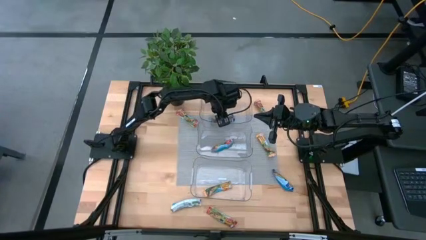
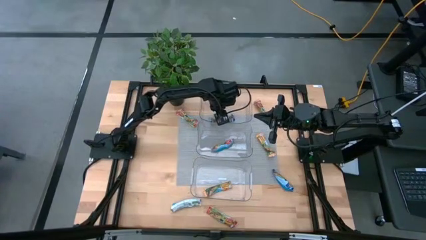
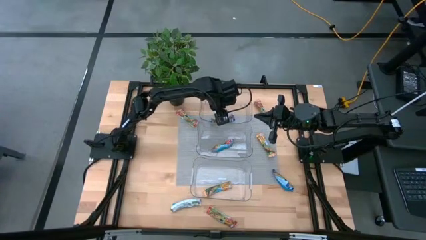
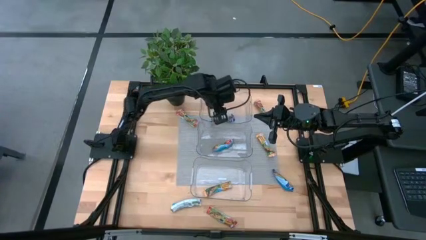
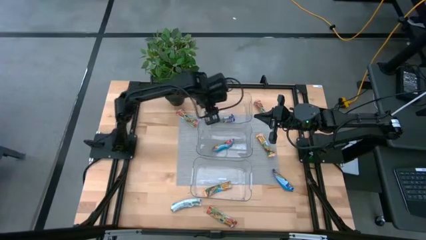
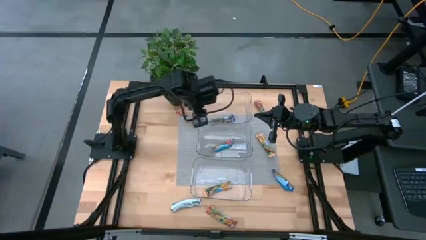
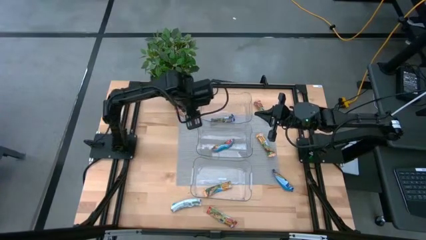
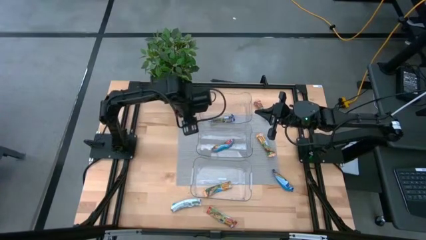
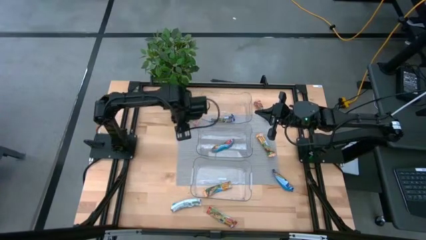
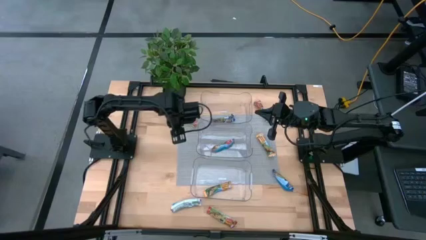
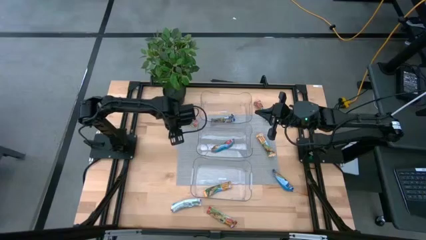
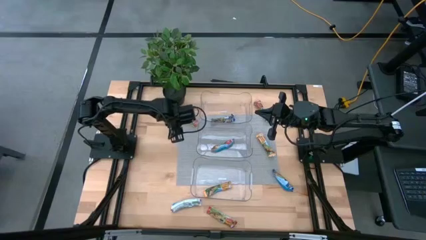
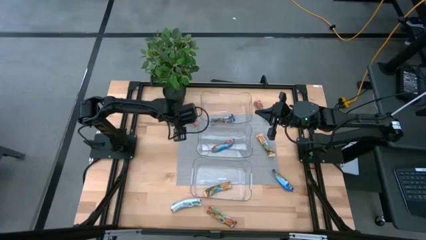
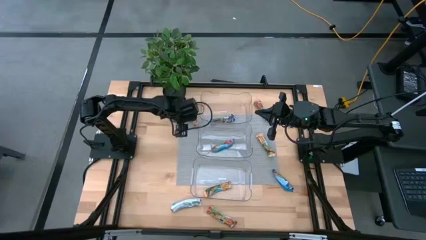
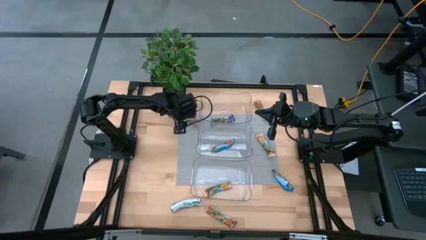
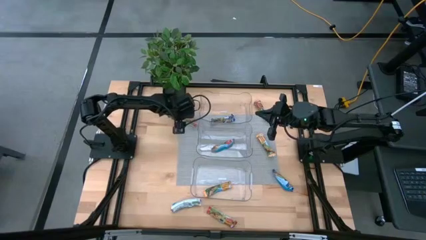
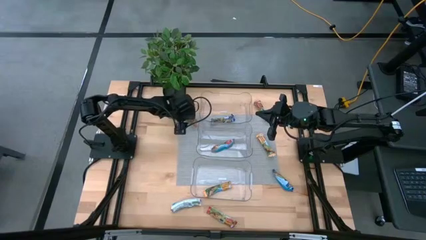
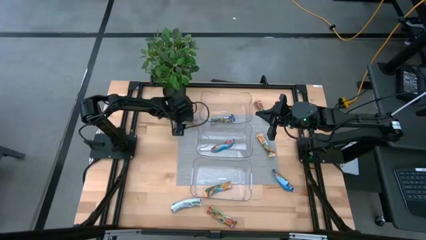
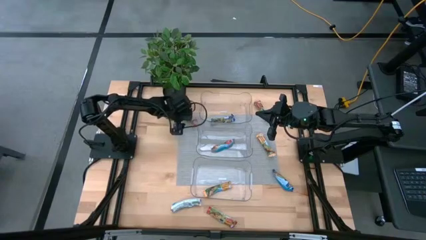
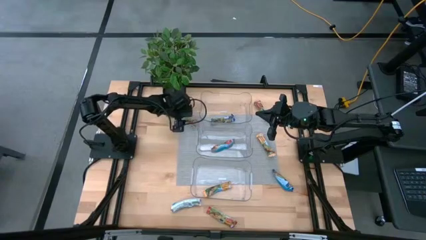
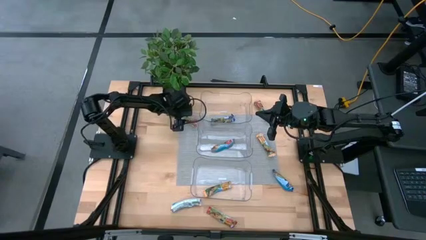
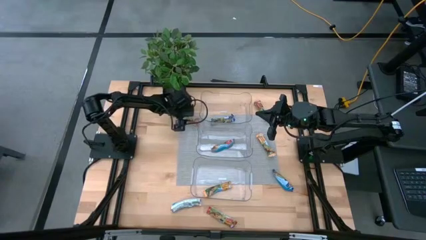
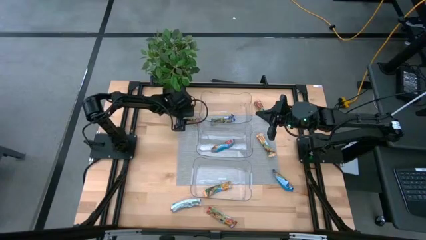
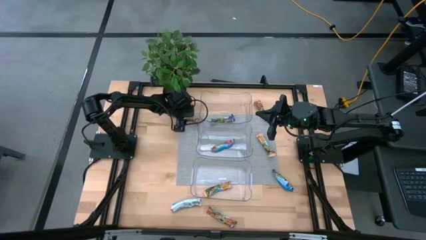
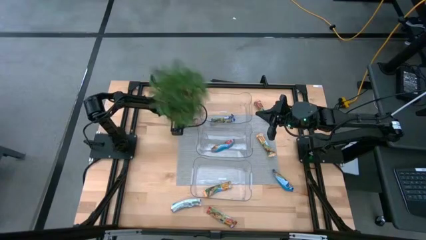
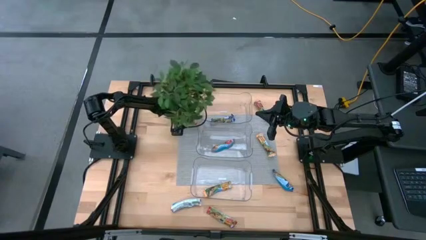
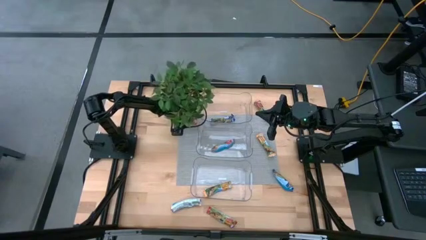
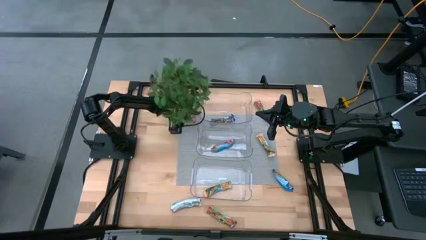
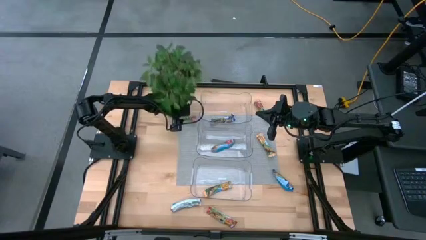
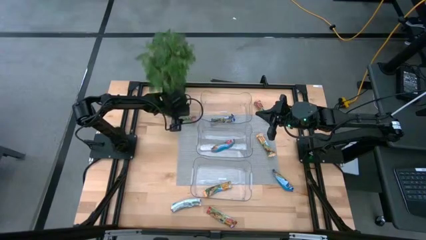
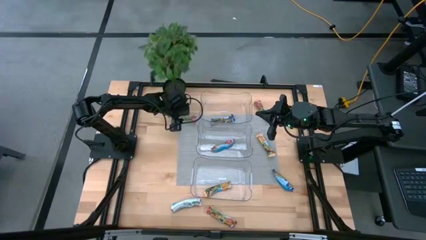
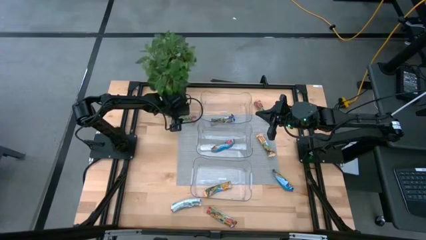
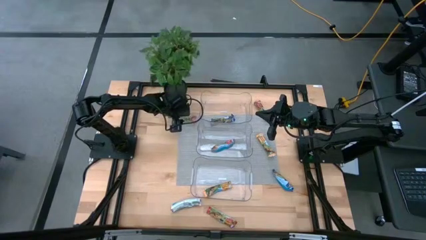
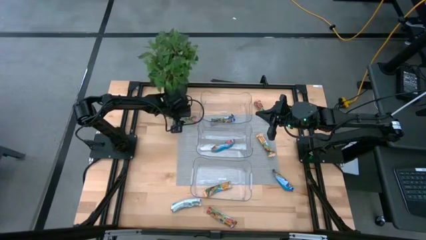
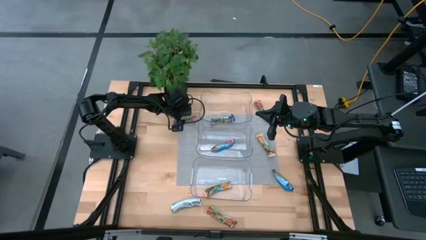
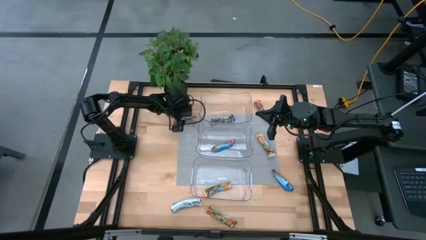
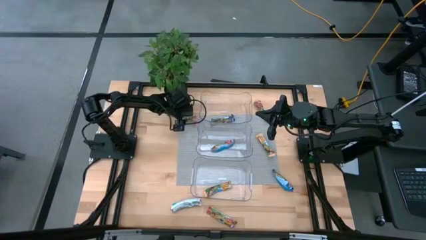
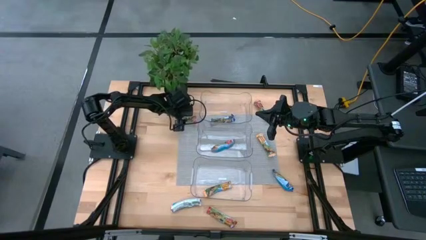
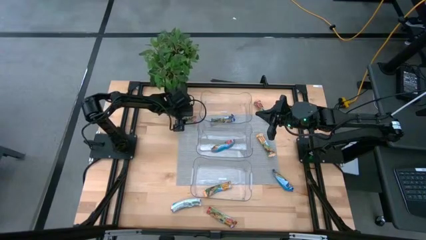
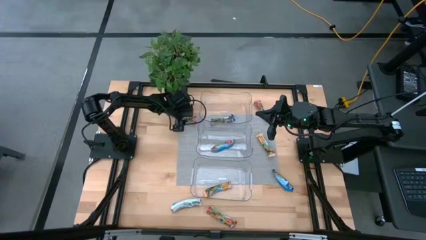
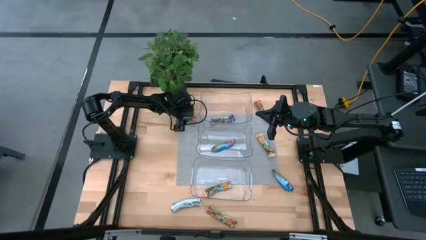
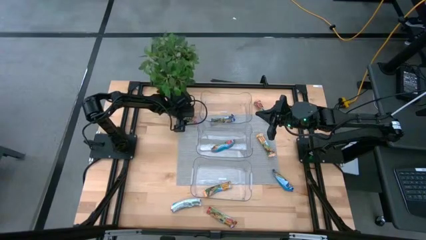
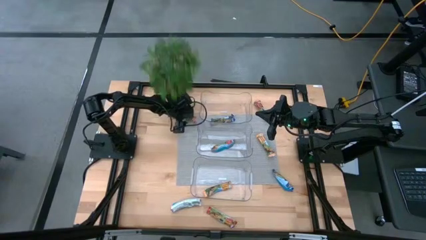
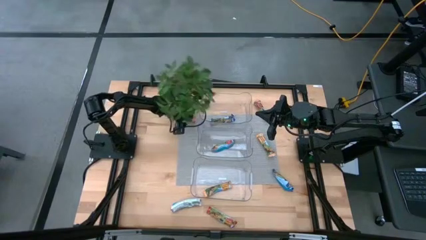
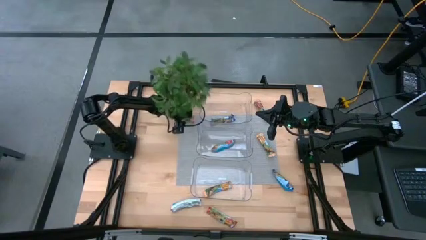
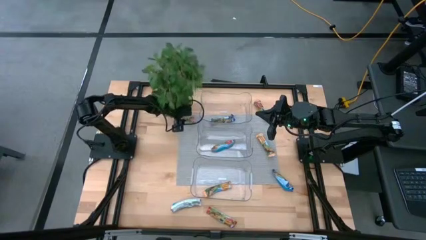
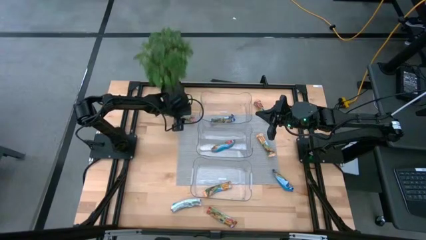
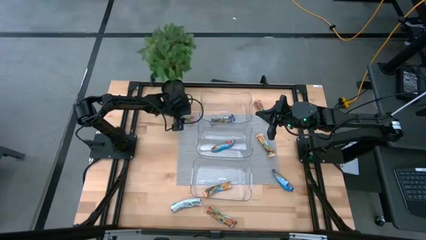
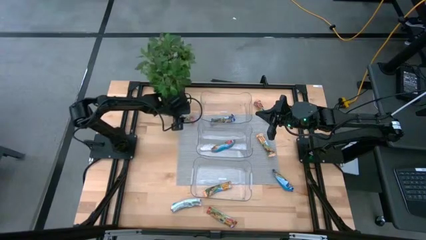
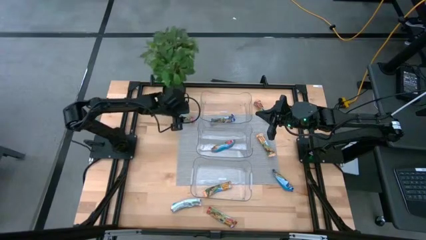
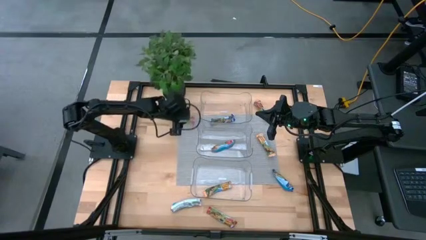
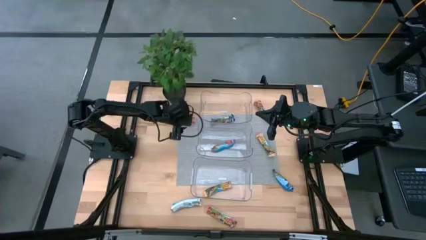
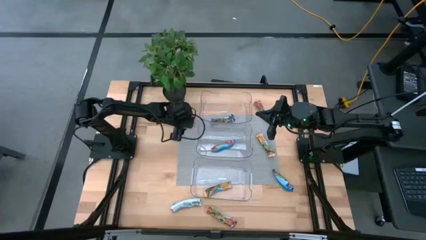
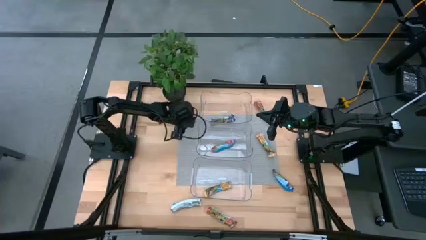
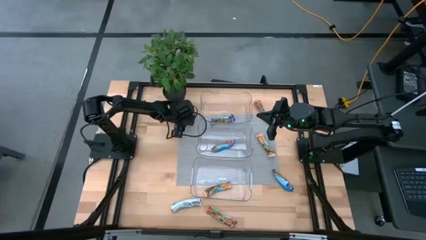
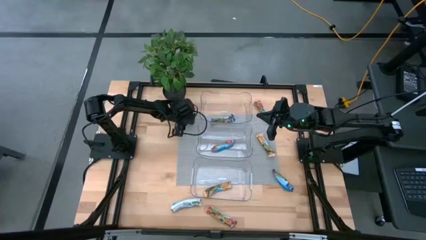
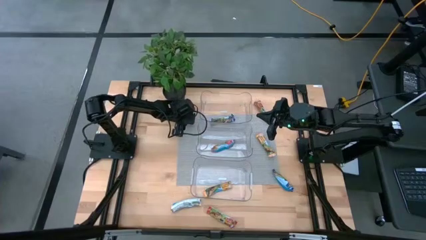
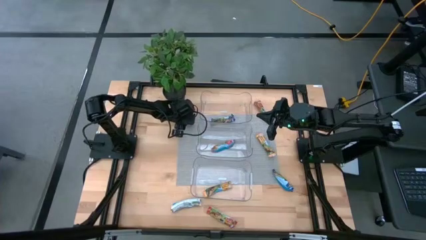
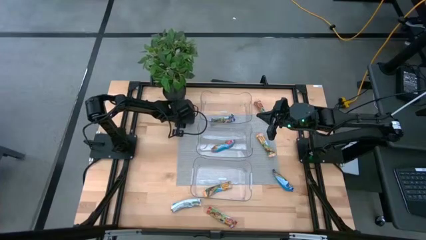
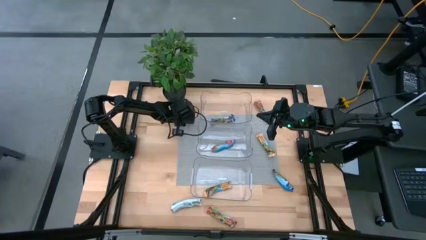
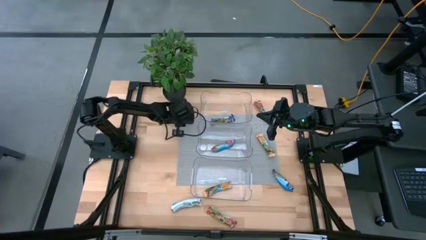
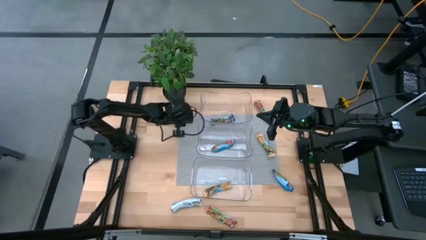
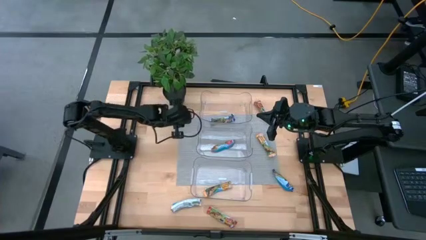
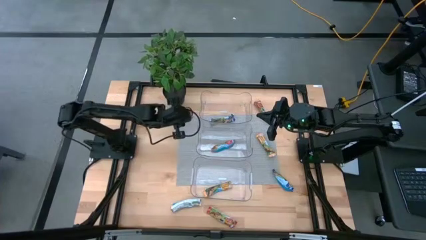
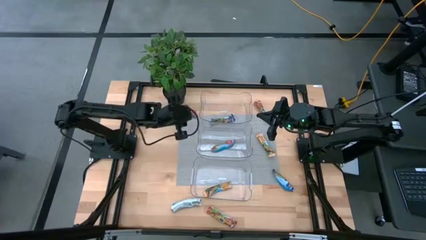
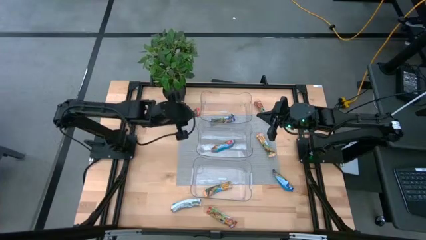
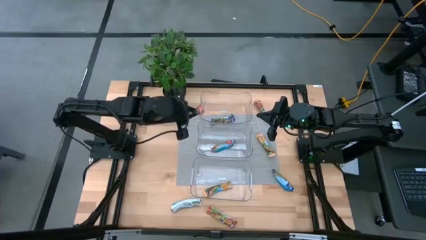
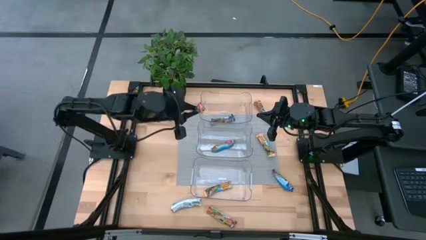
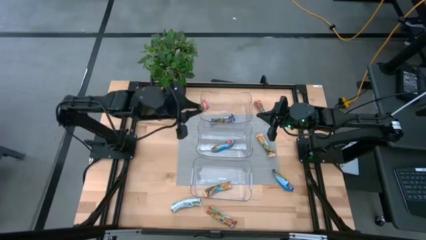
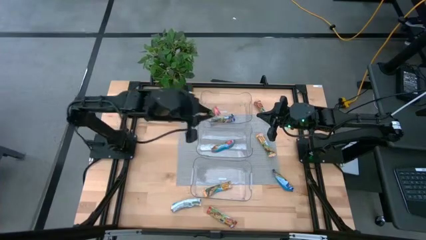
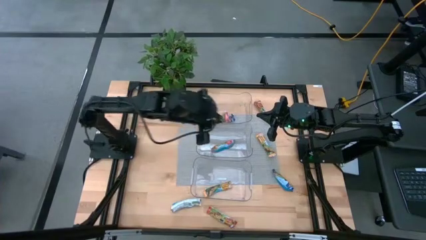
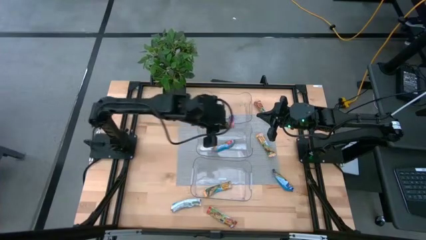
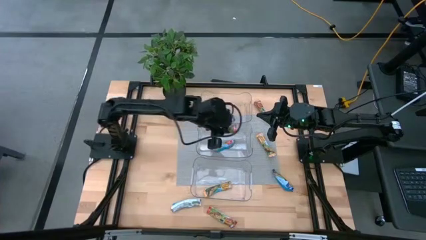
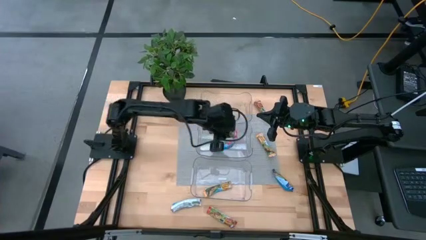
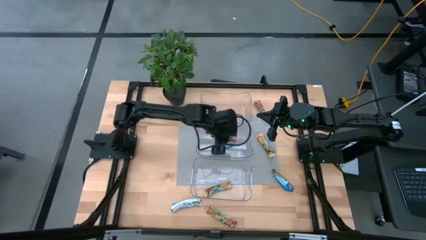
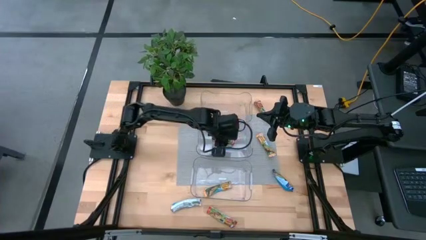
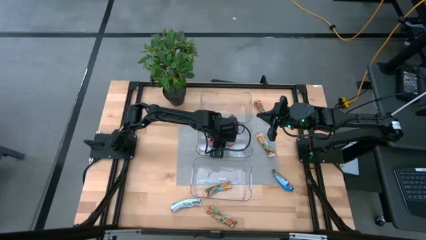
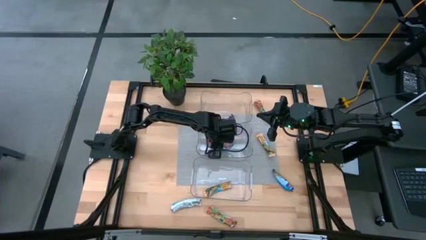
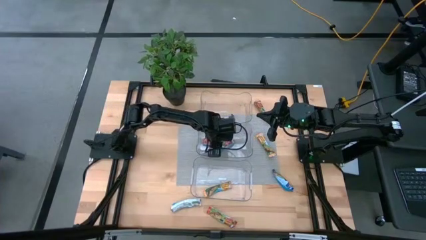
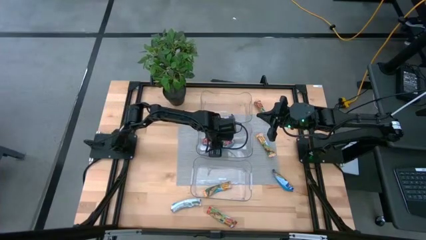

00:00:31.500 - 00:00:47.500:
Task: Pick and place Granola Bars by type
Put the red granola bar into the middle transparent bin
